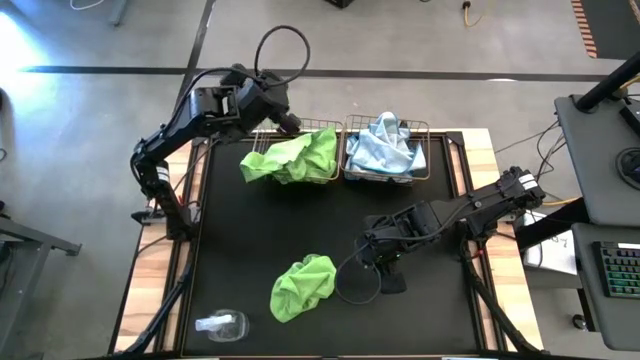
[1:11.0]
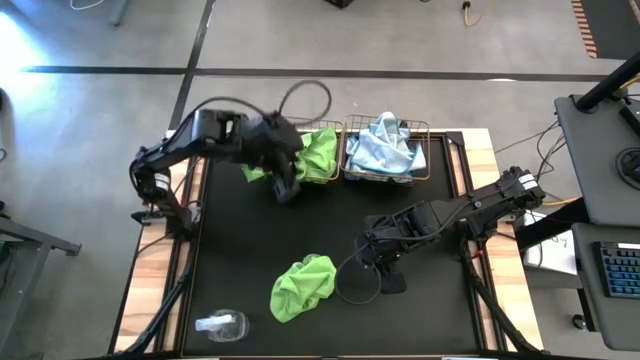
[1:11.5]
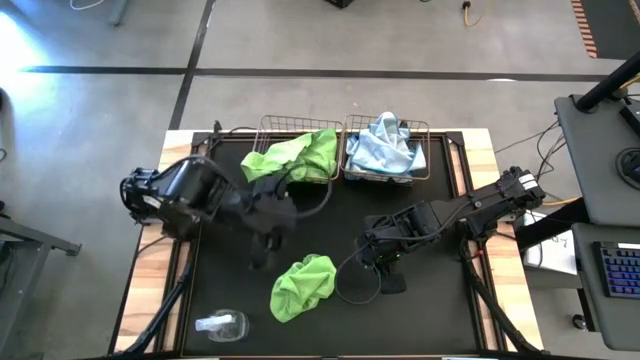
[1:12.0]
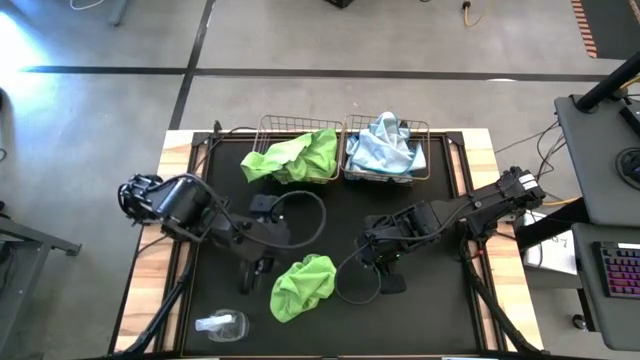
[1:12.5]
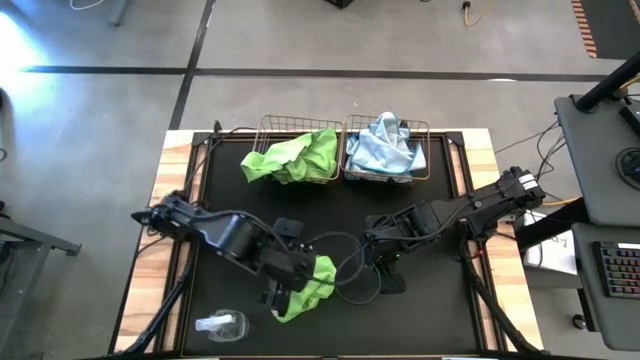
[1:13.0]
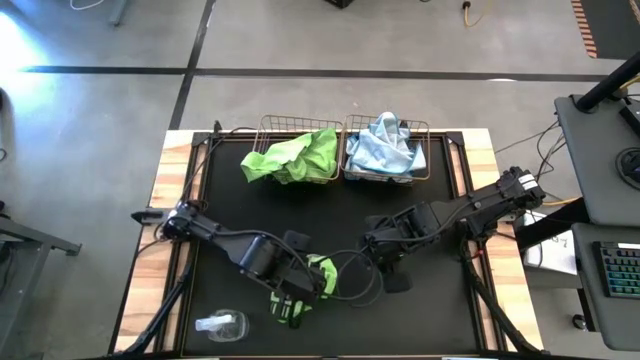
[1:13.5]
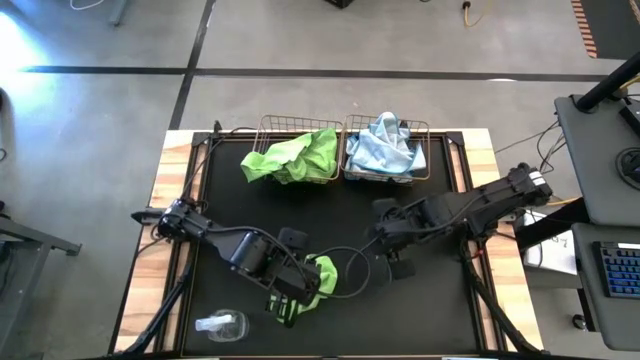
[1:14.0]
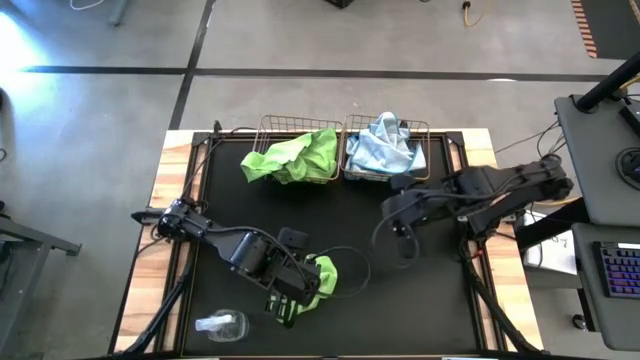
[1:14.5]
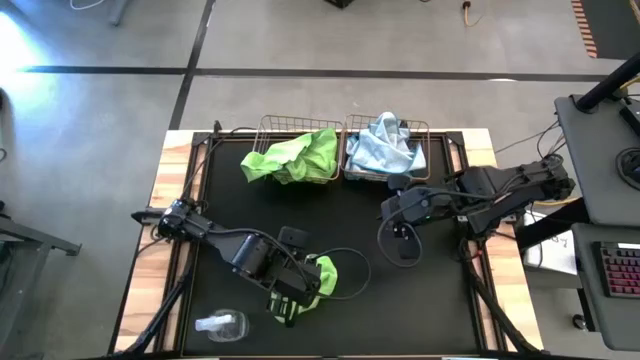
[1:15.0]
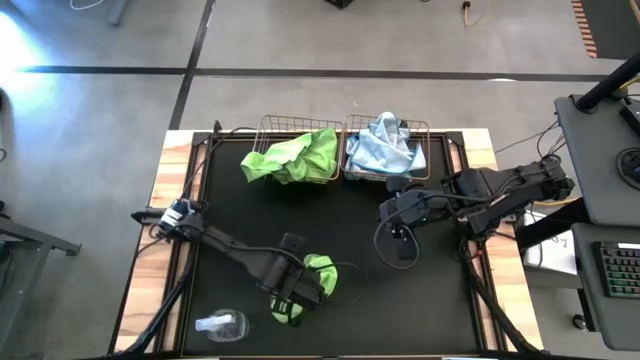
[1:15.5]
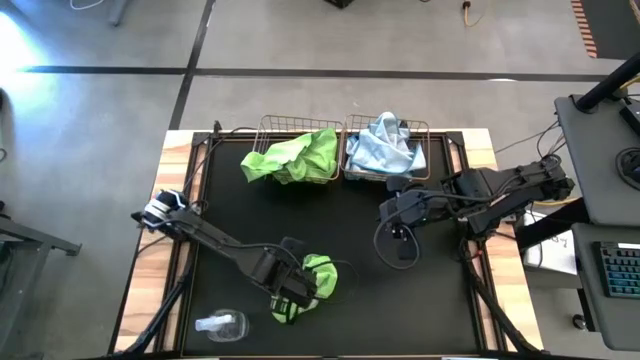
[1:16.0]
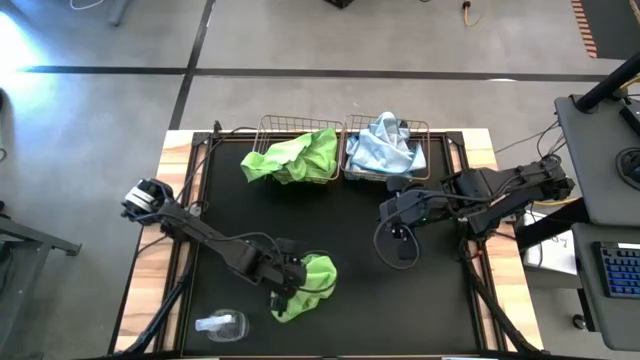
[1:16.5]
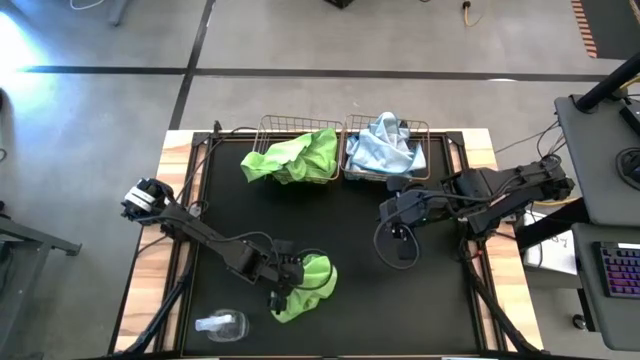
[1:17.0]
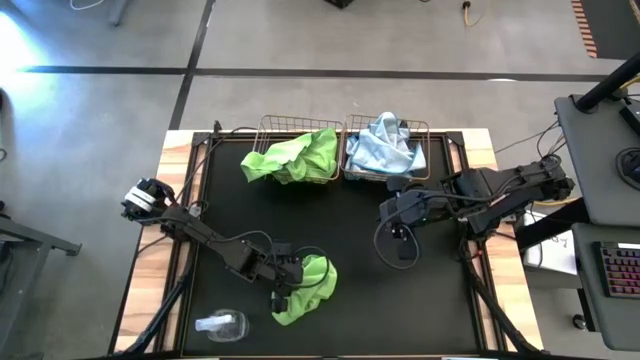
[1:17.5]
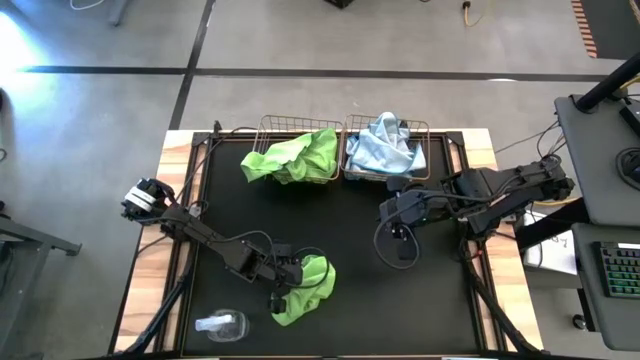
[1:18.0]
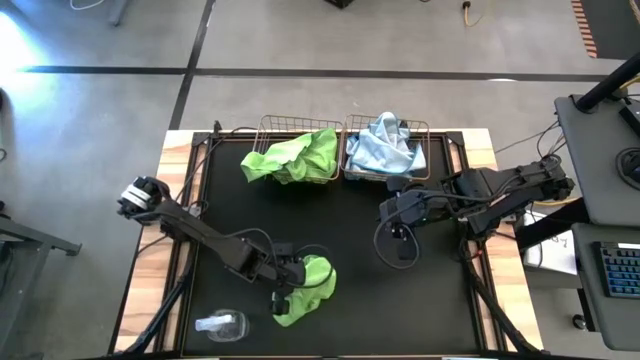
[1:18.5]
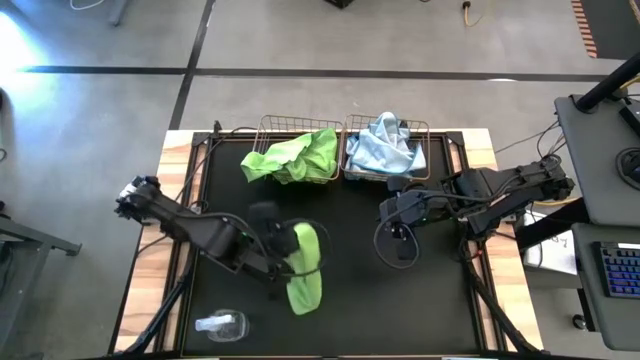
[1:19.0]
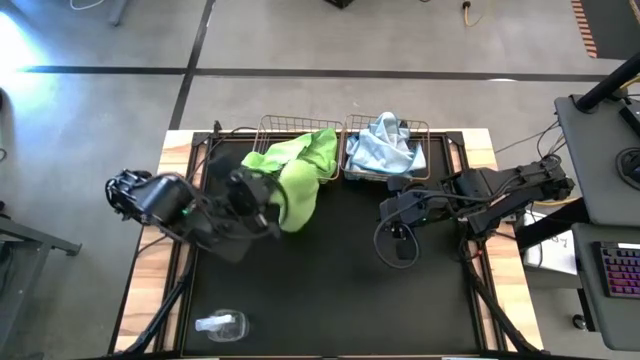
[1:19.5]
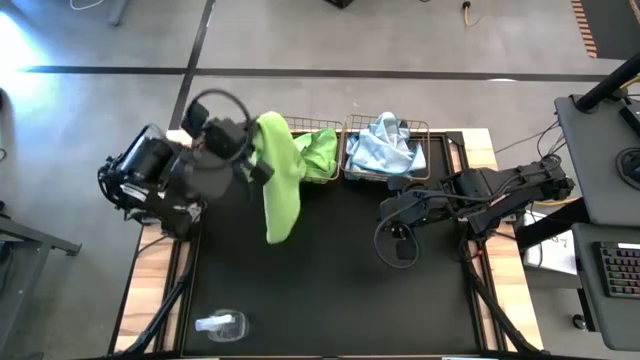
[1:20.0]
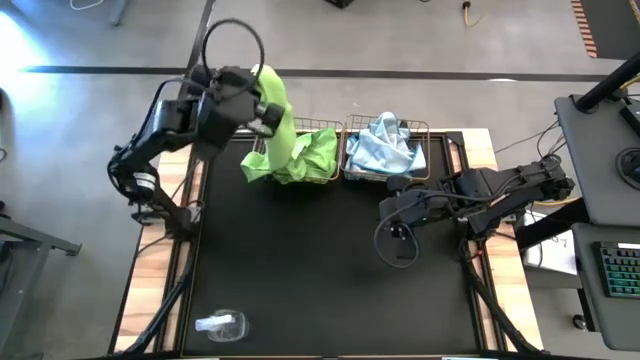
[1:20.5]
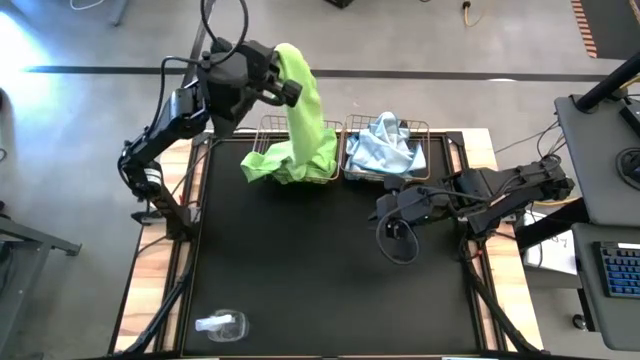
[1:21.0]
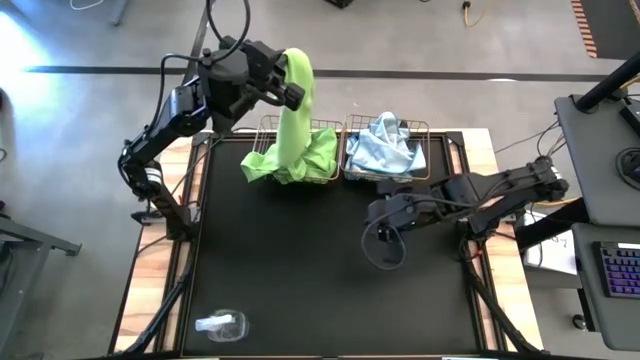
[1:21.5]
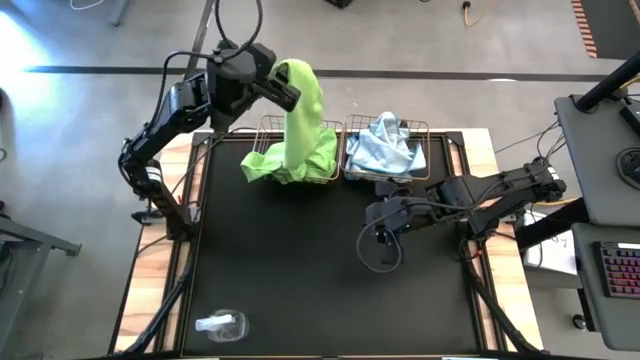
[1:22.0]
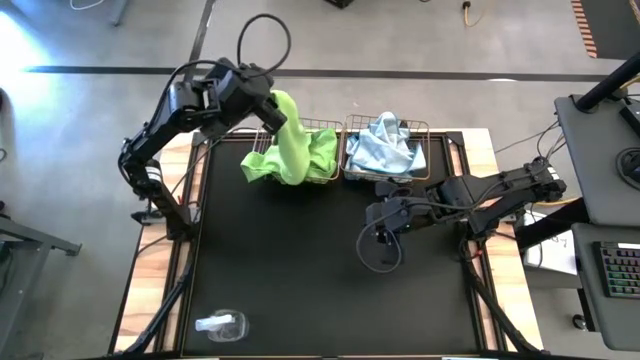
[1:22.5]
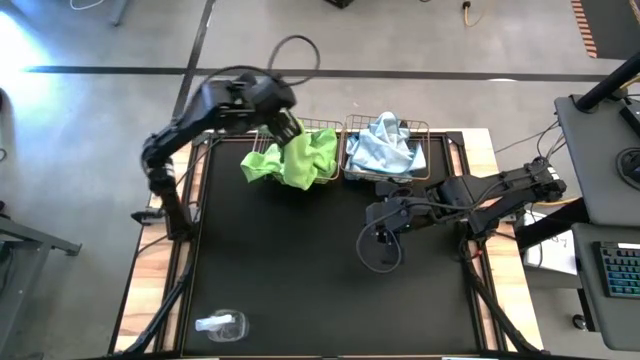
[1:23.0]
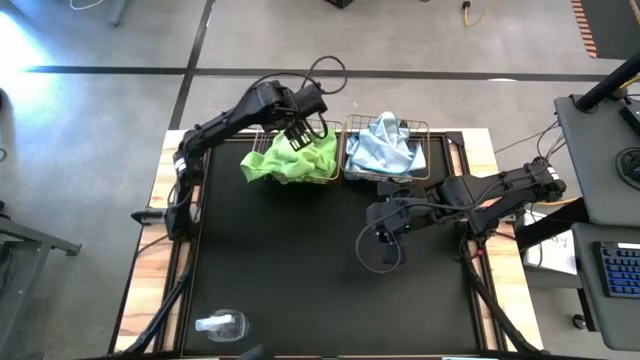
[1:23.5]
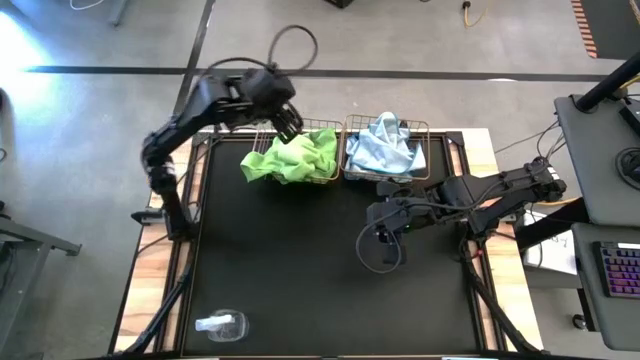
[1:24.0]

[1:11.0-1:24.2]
Task: Sort microfiber towel by color & place in baskets
Put the green microfiber cloth into the left wire basket

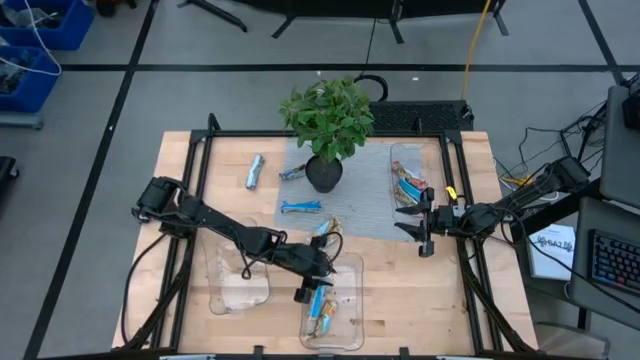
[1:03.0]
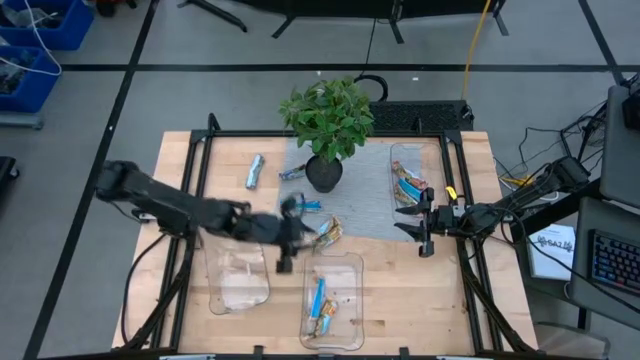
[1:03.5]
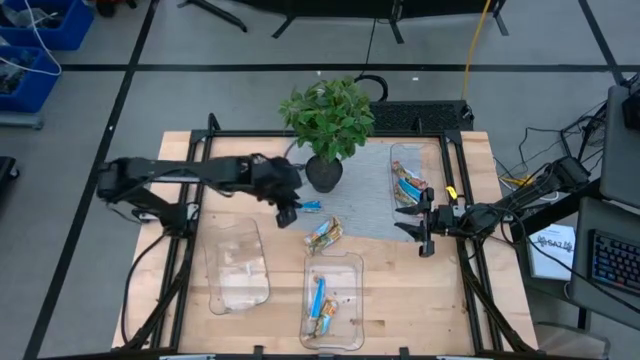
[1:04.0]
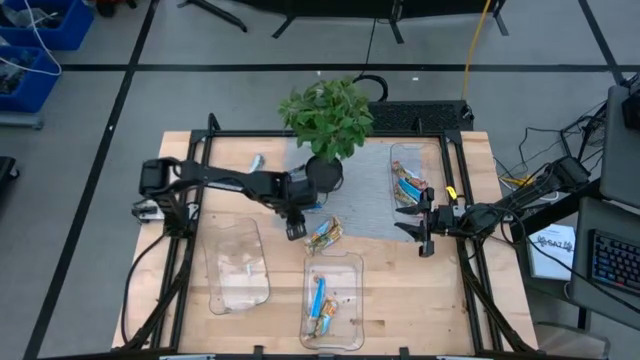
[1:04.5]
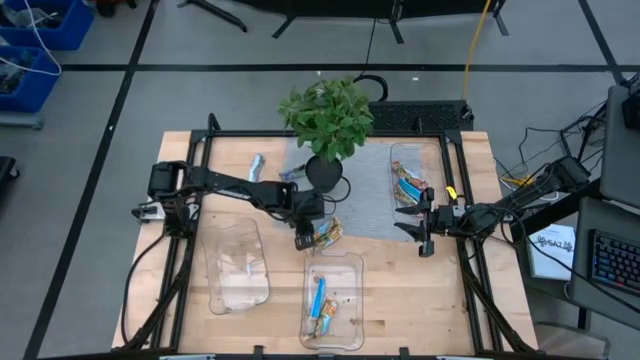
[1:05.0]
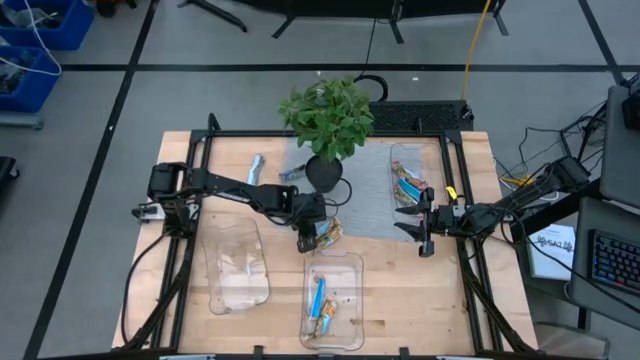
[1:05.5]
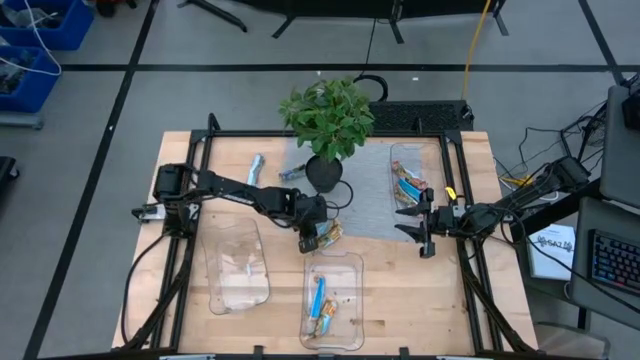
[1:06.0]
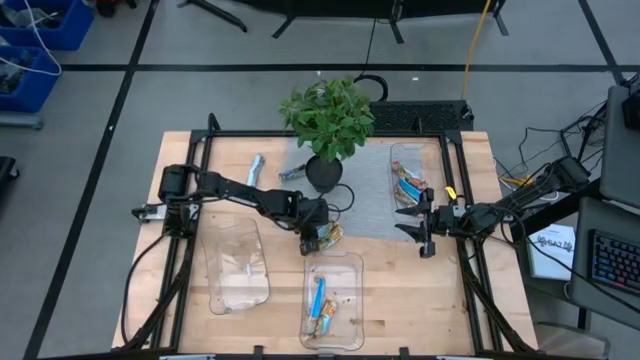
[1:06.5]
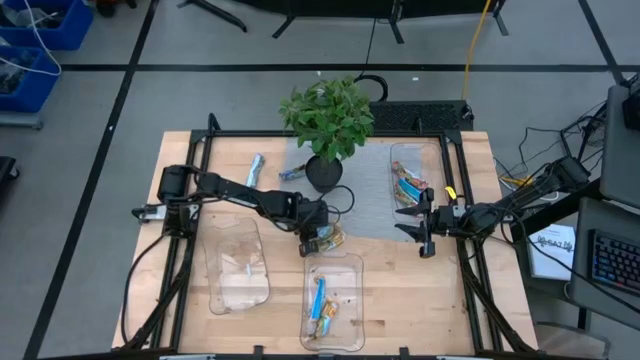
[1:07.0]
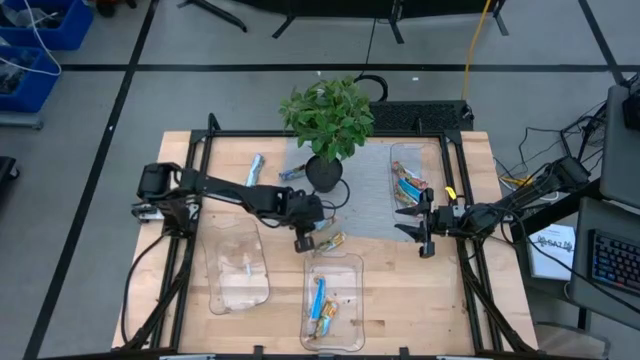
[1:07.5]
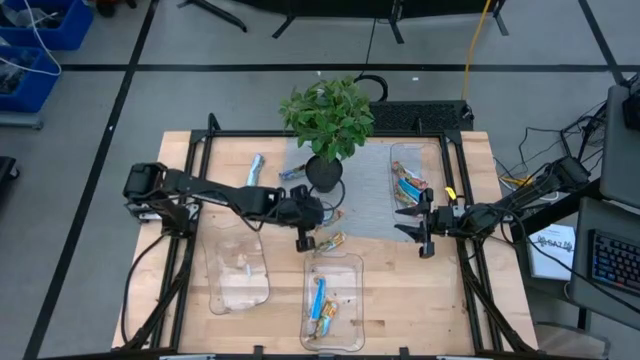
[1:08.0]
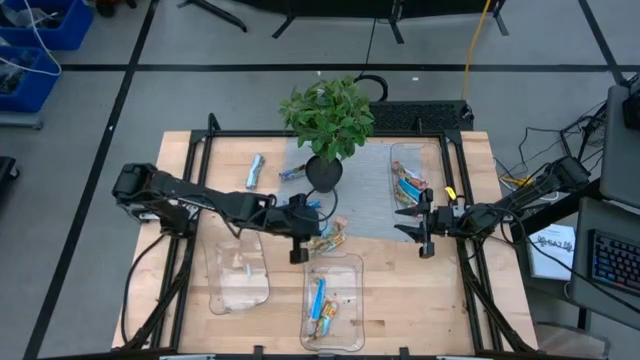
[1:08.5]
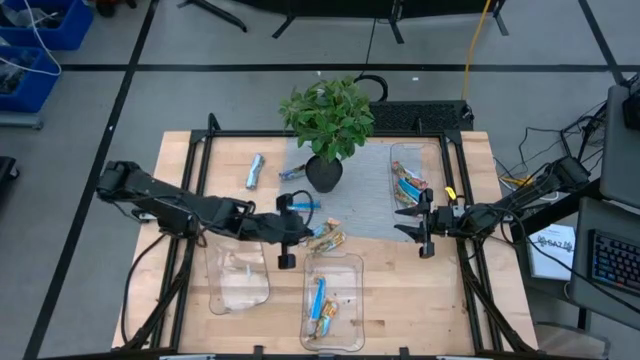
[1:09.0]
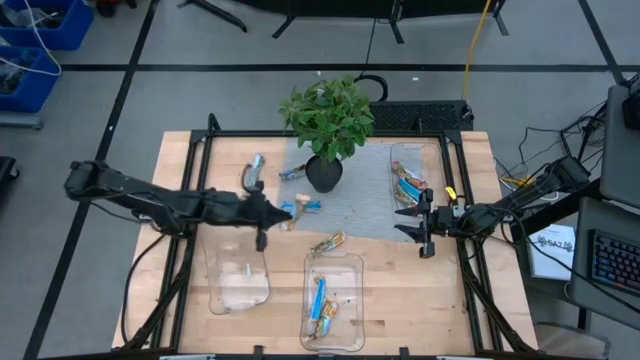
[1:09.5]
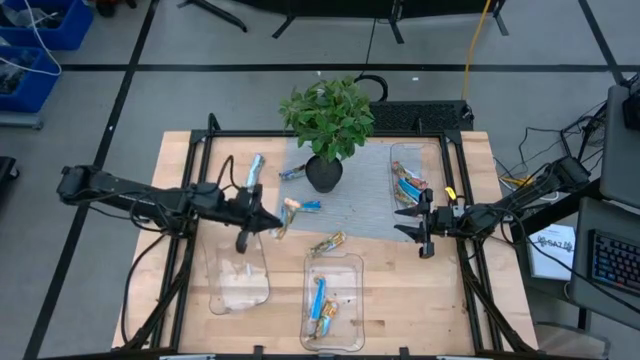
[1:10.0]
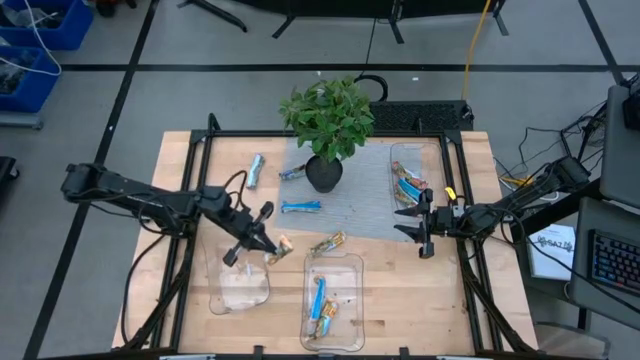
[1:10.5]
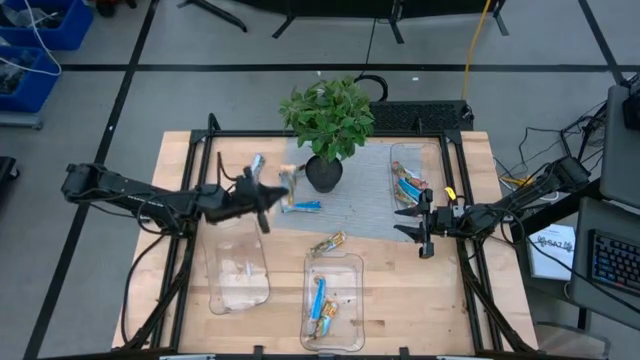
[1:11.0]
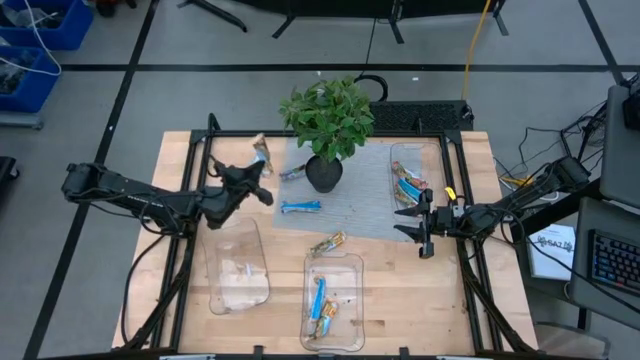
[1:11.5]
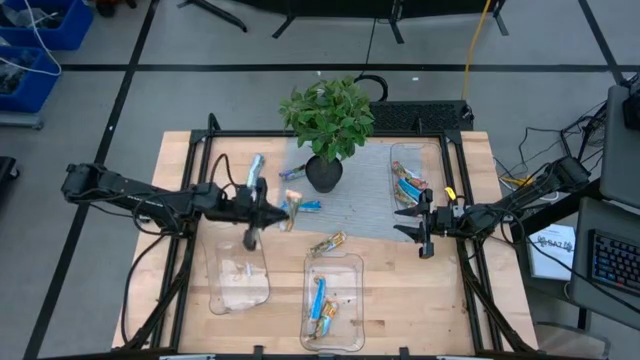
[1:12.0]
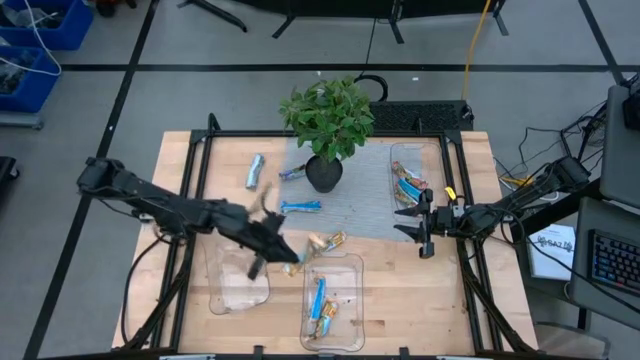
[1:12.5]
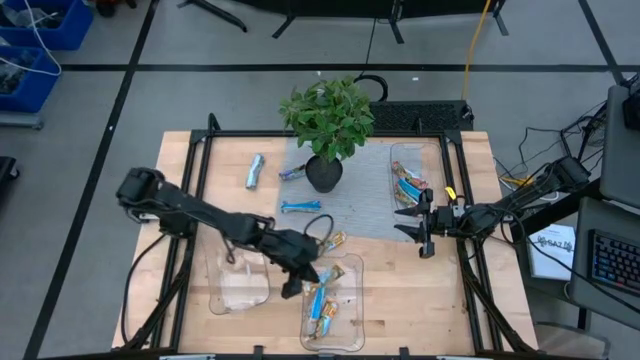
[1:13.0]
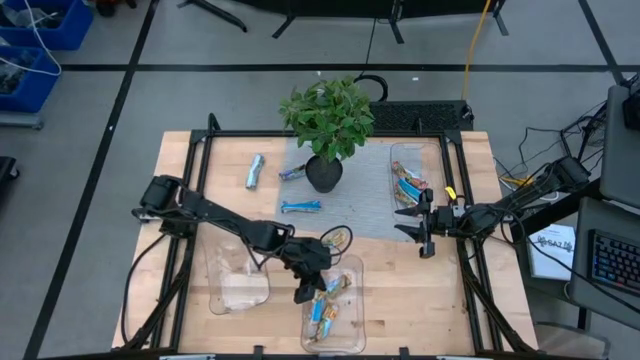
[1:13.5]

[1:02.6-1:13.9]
Task: Pick and place Granola Bars by type
Put the top yellow granola bar into the middle transparent bin
